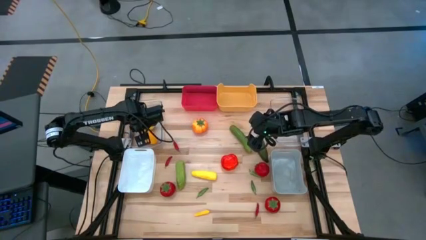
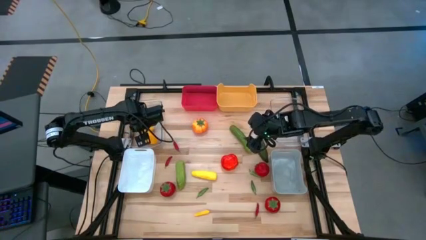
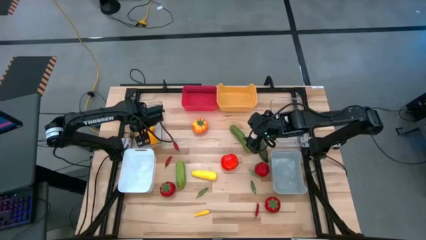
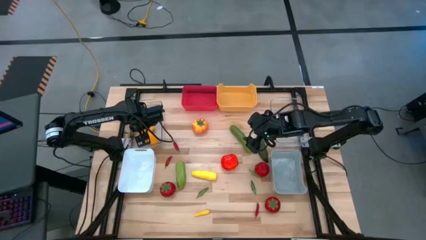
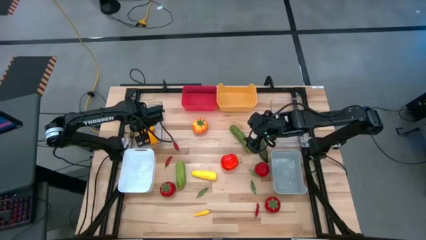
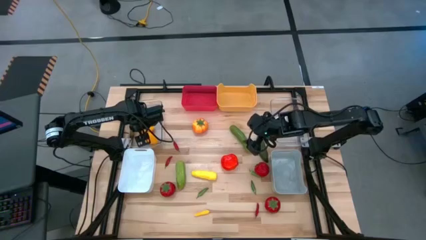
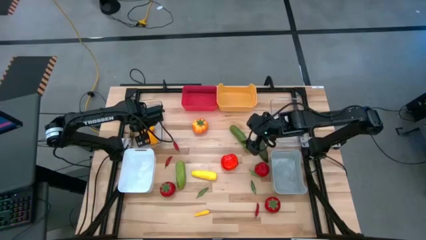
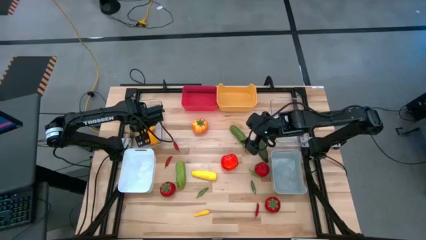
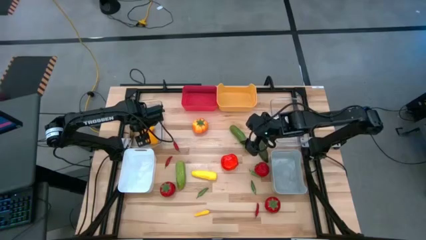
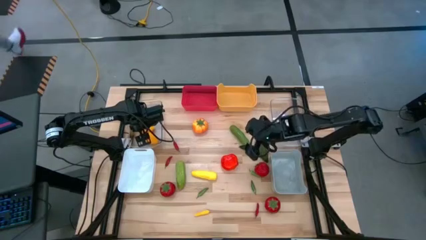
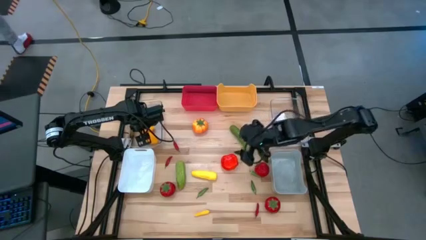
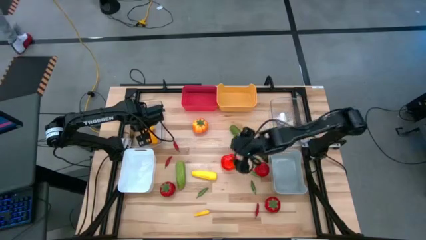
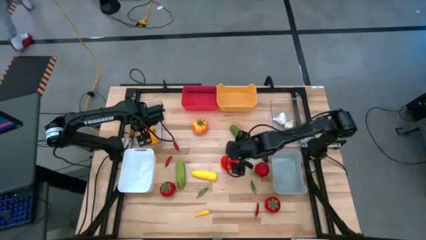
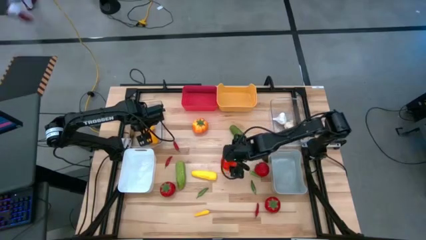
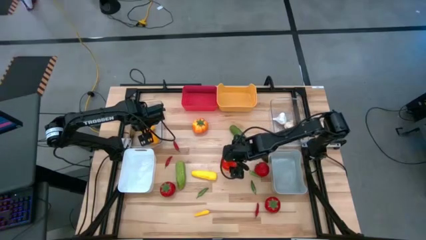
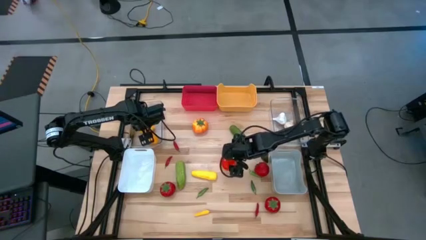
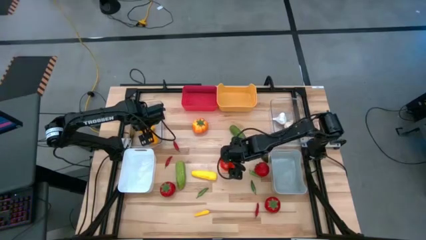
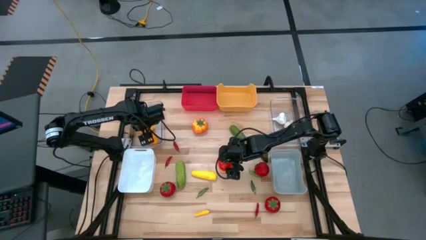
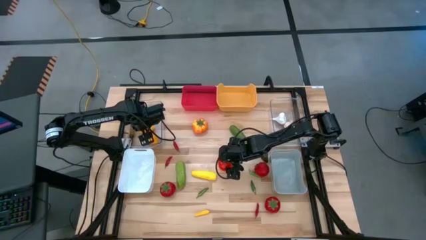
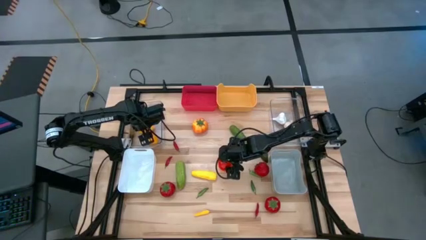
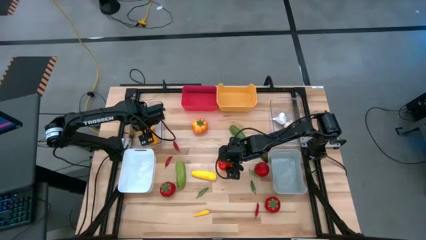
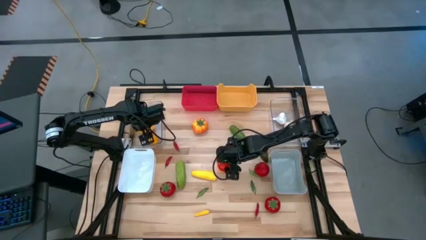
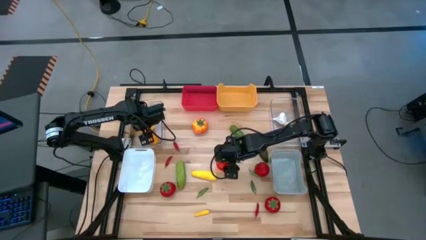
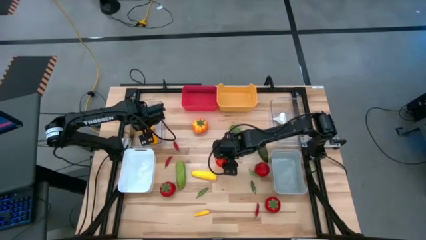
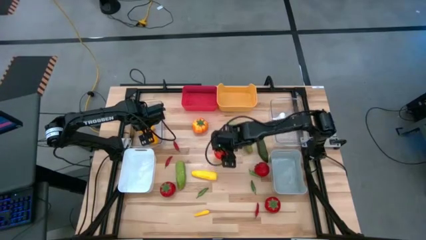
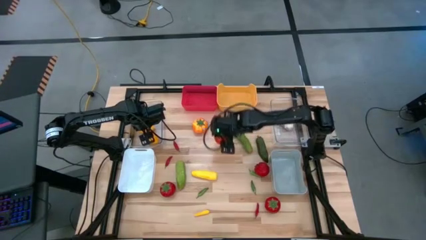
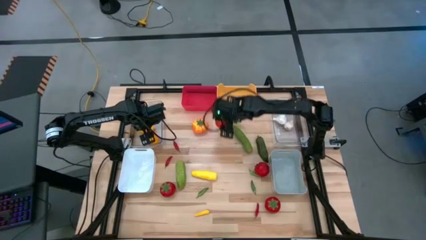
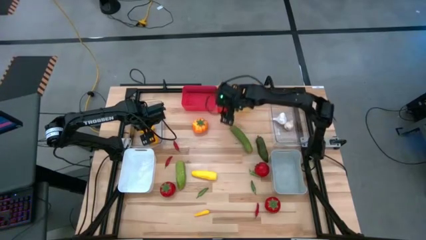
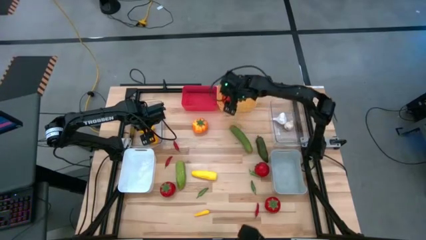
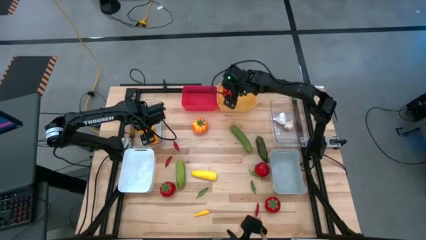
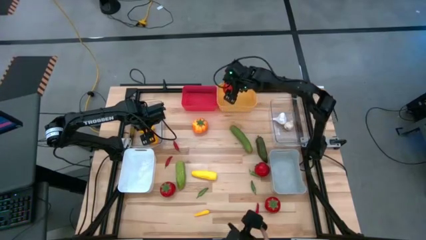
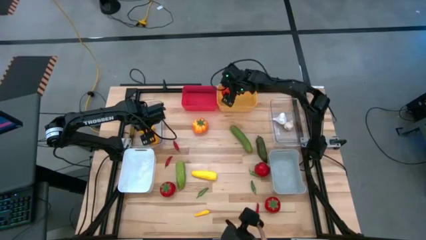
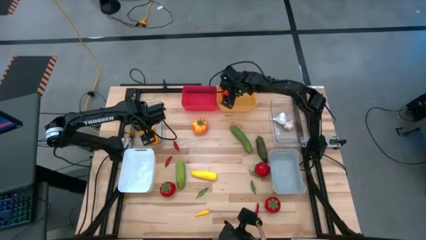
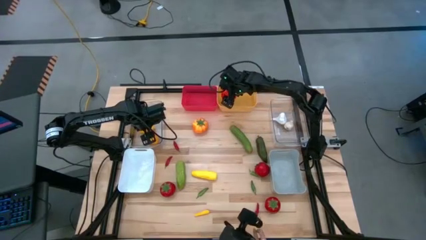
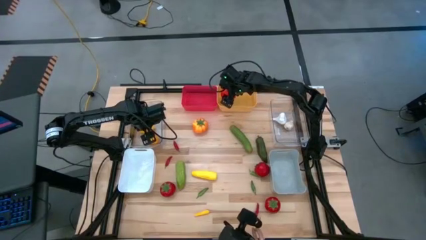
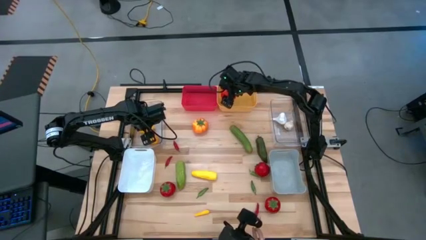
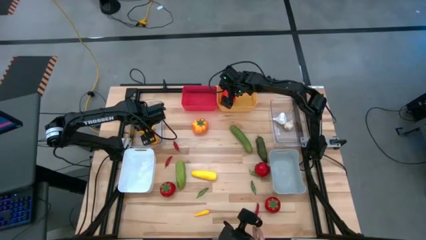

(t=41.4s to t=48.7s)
Task: Sort produce into baskets
Put the red tomato into the yellow bin

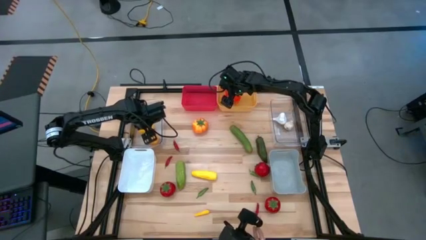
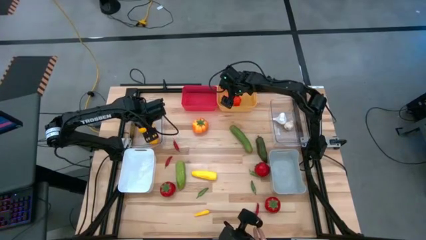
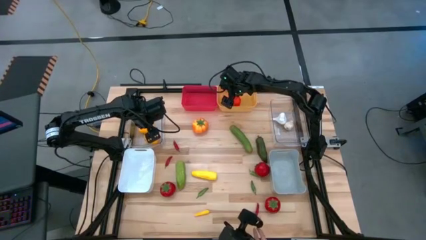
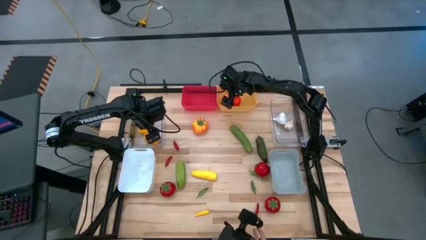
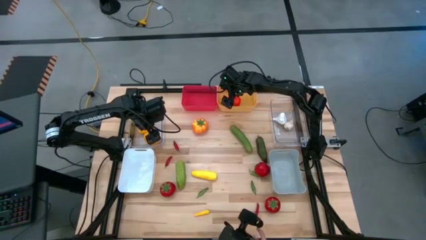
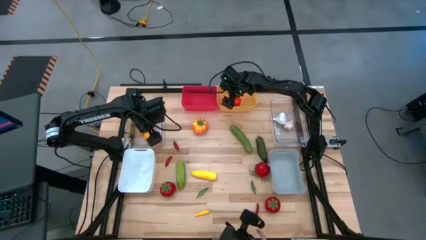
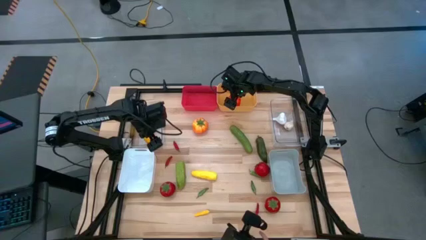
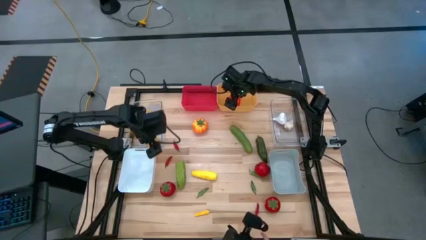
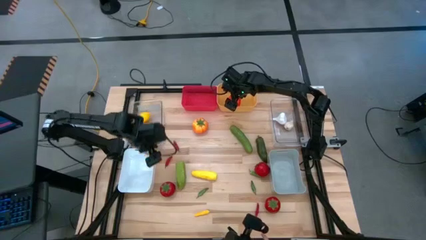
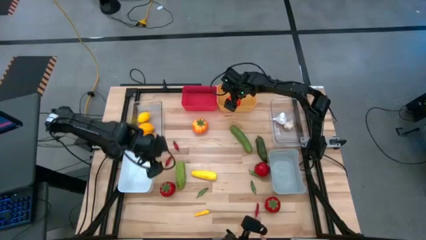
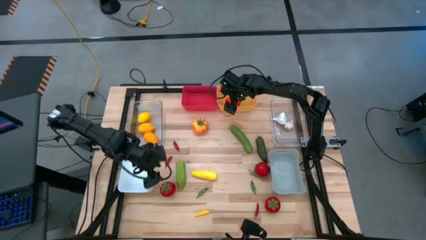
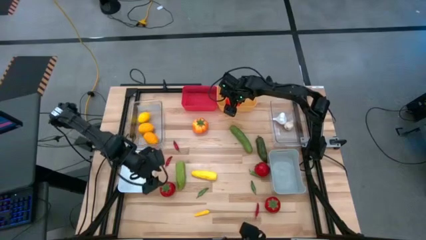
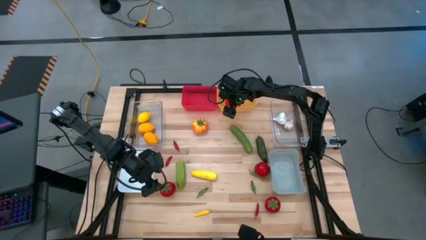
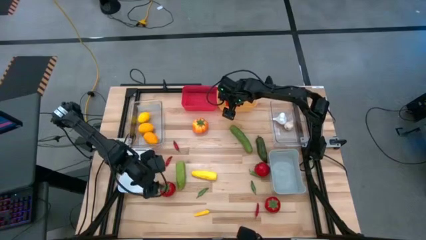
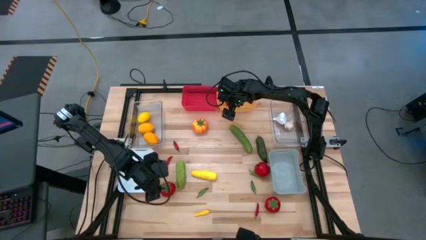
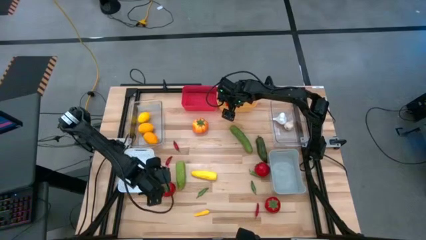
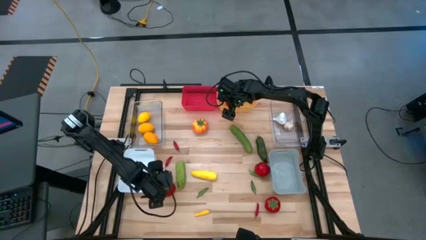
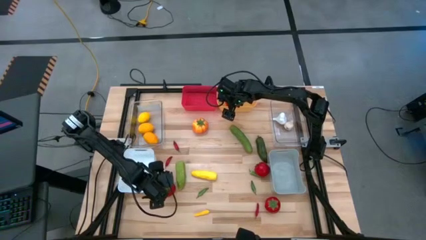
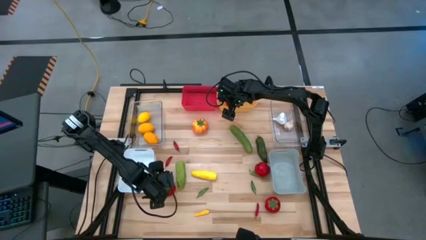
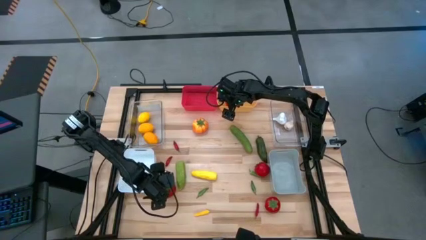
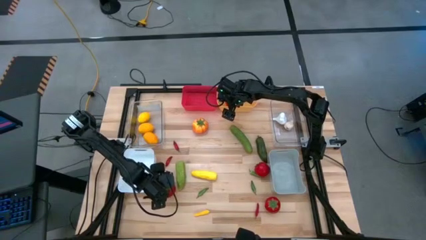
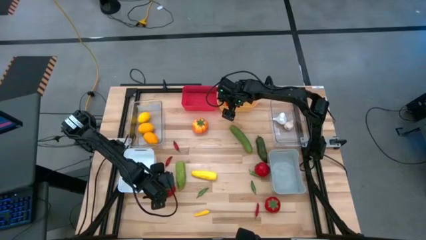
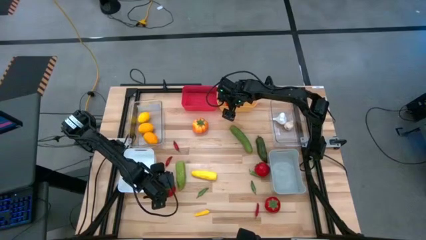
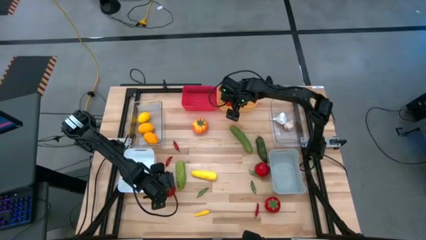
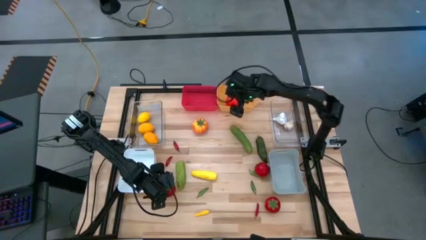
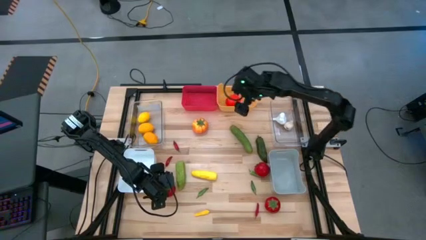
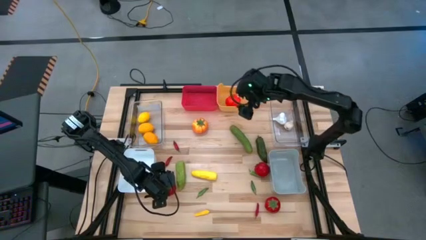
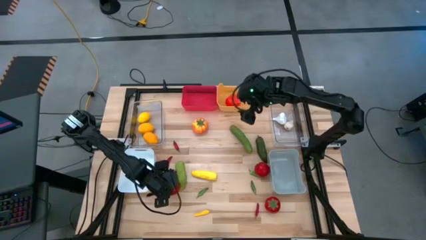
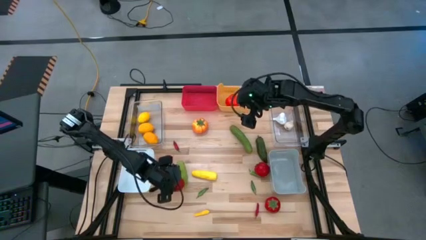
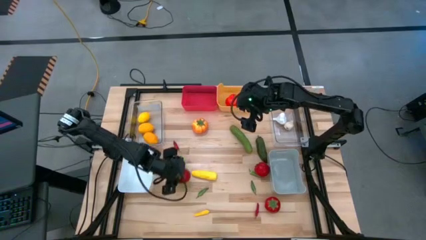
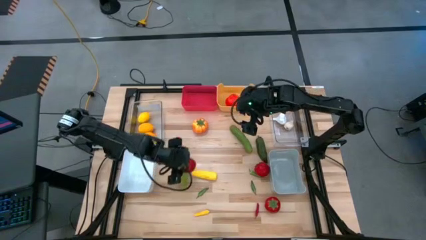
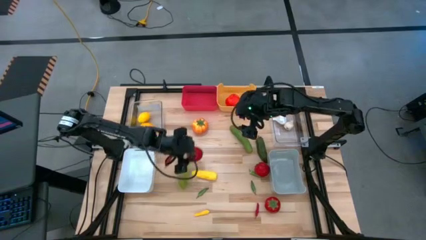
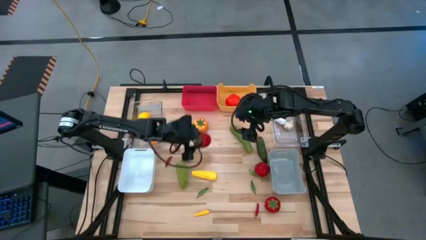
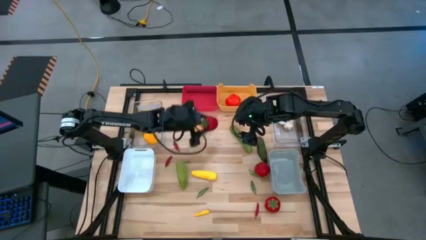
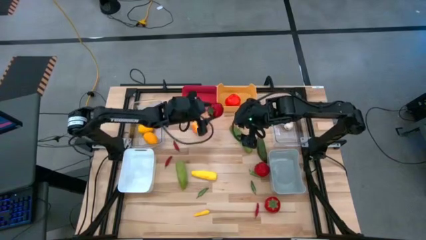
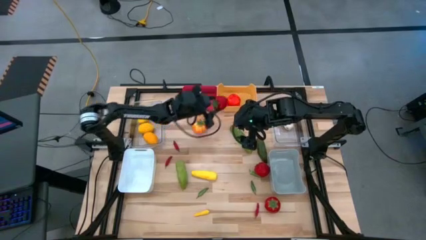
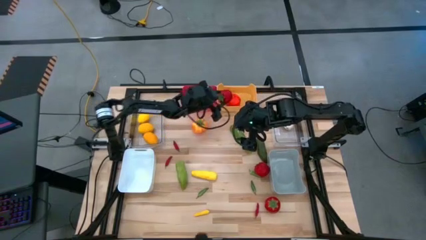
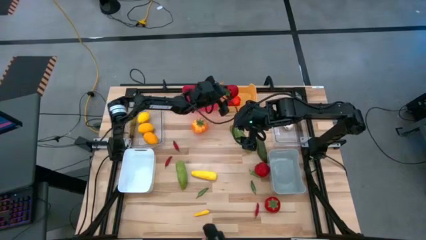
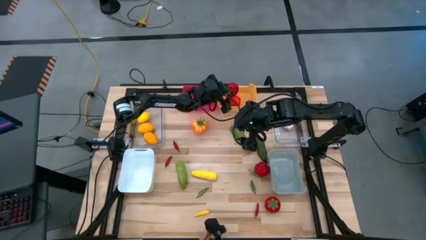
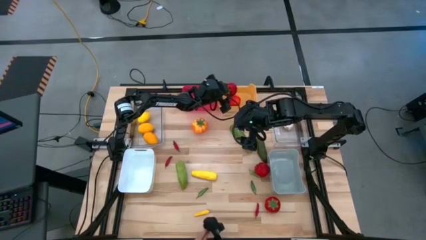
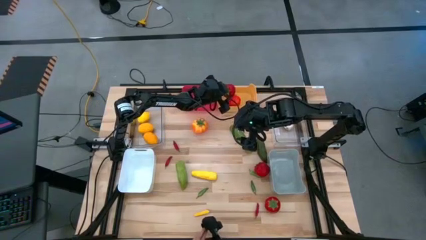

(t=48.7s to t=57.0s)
Put the red tomato into the yellow bin

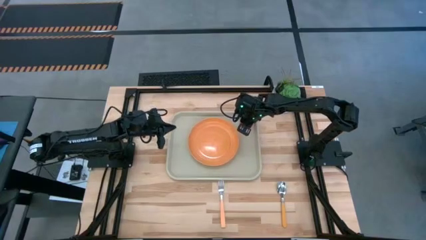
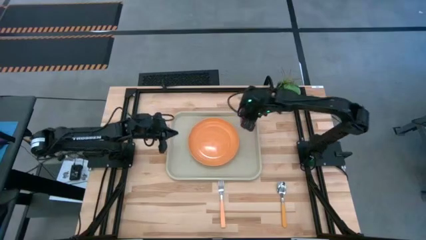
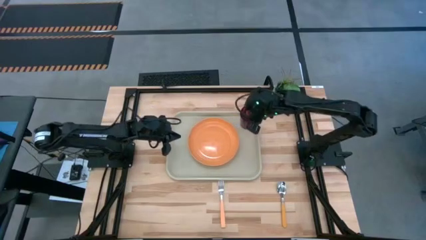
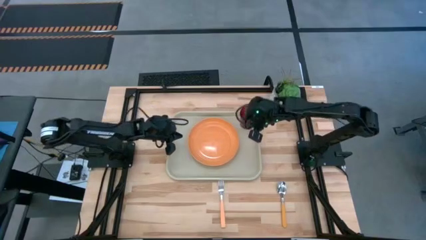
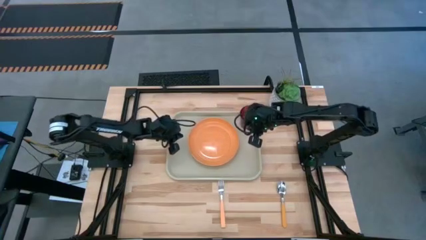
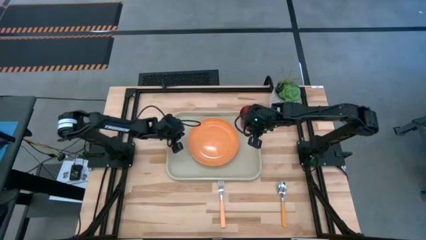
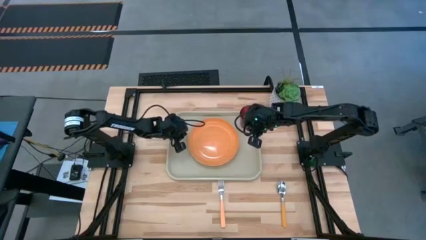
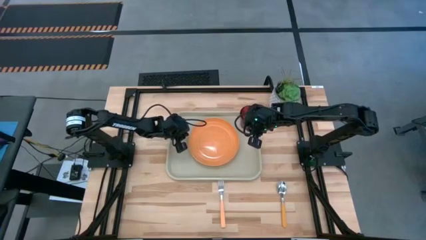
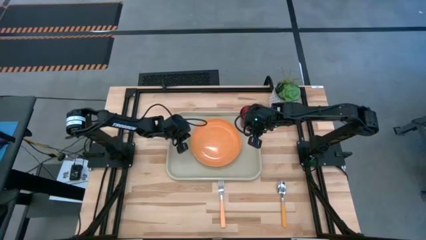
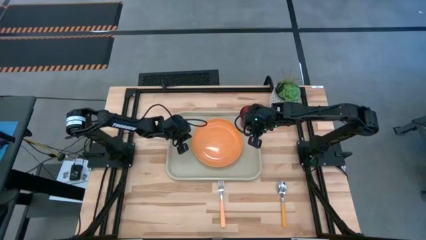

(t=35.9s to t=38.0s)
Task: Pick and place plate/cup/fork/spoon on tray
Adjust the orange plate on the gray serving tray
